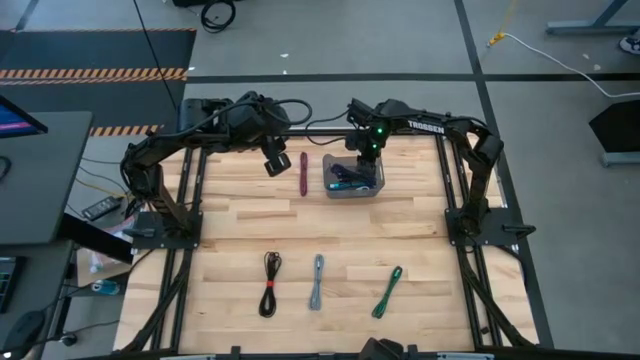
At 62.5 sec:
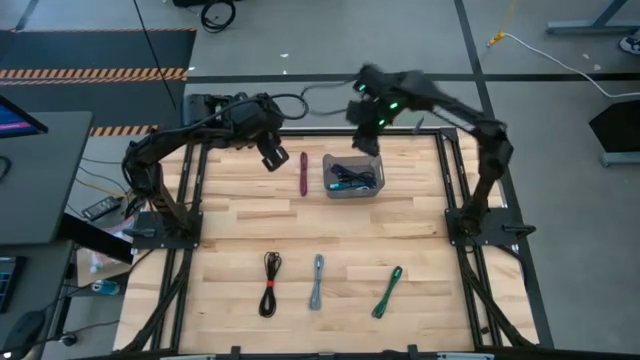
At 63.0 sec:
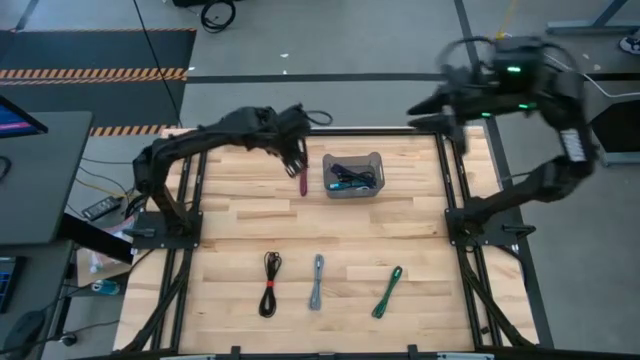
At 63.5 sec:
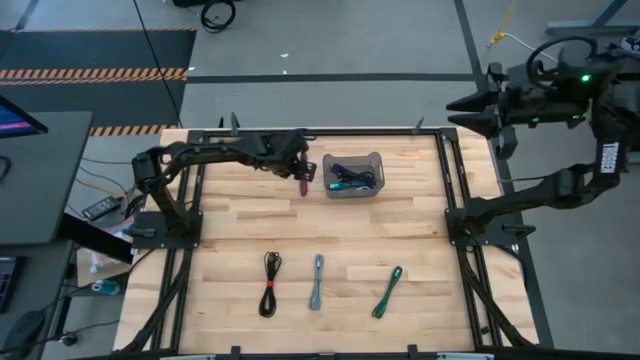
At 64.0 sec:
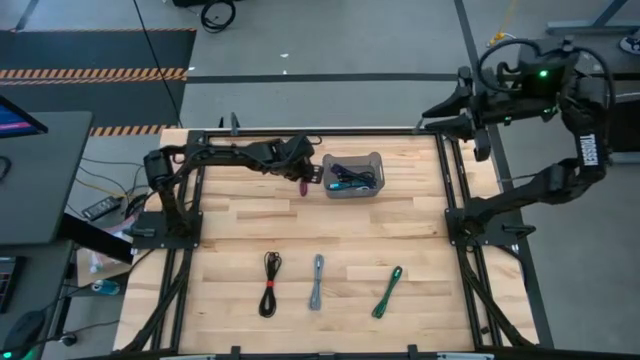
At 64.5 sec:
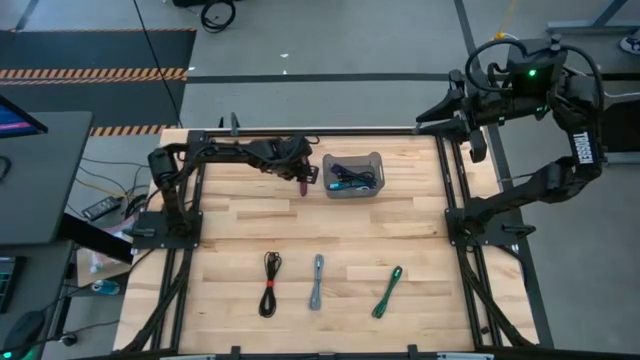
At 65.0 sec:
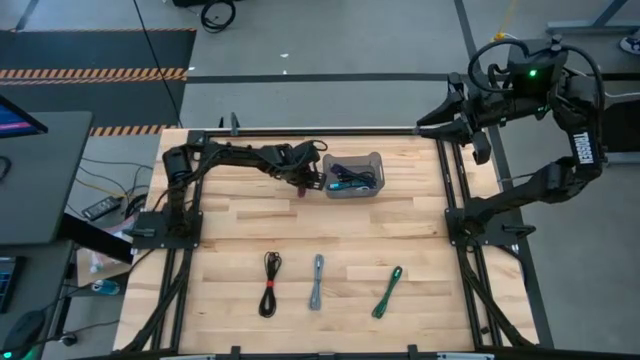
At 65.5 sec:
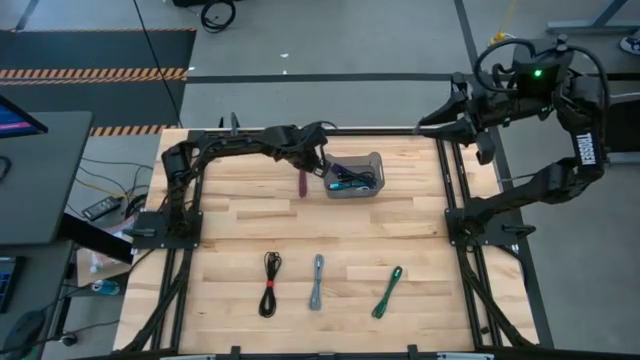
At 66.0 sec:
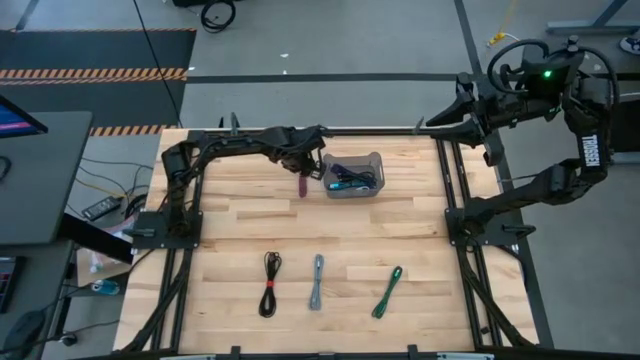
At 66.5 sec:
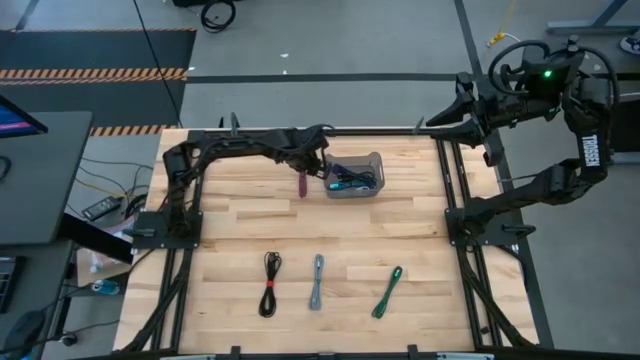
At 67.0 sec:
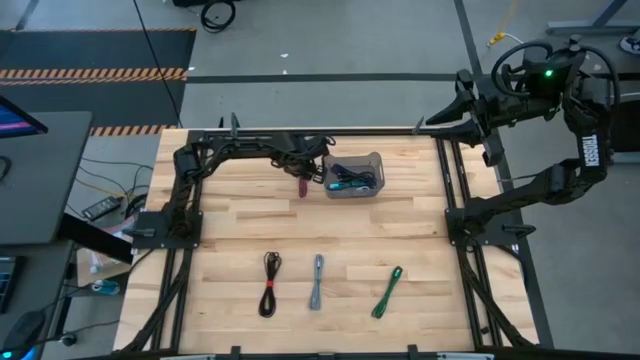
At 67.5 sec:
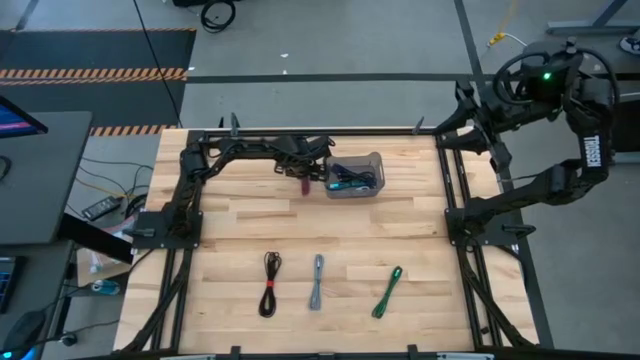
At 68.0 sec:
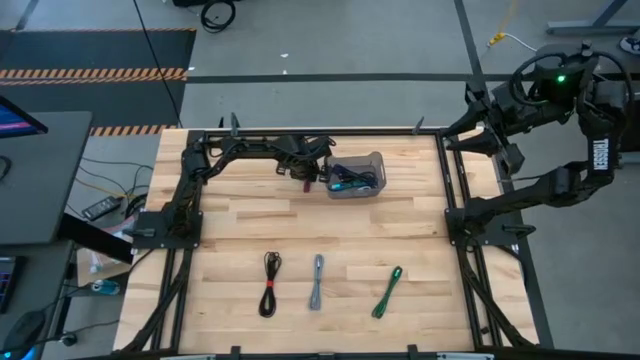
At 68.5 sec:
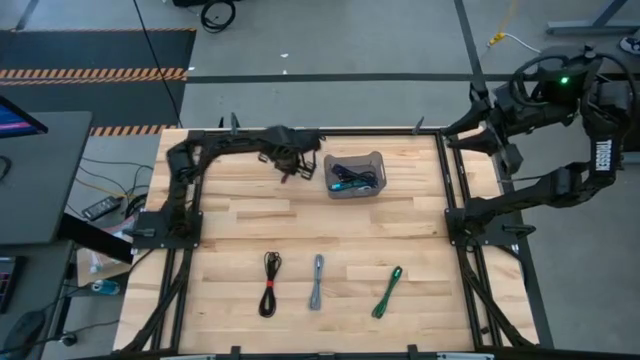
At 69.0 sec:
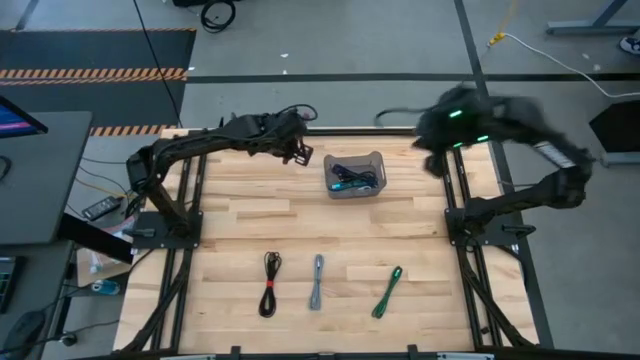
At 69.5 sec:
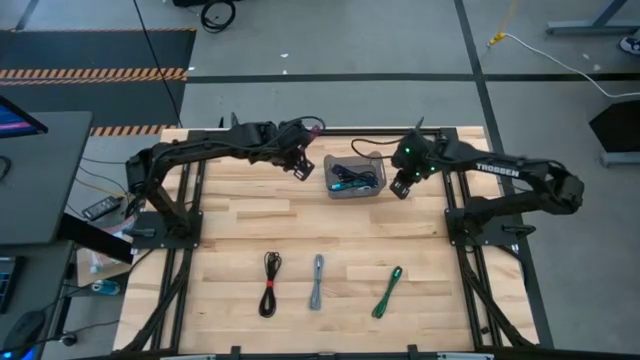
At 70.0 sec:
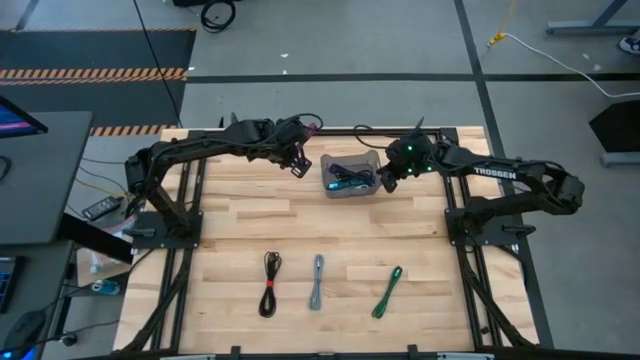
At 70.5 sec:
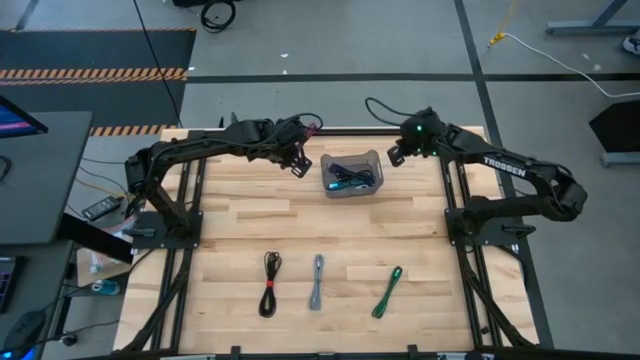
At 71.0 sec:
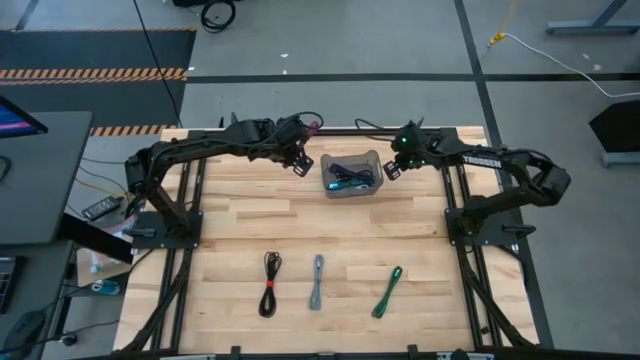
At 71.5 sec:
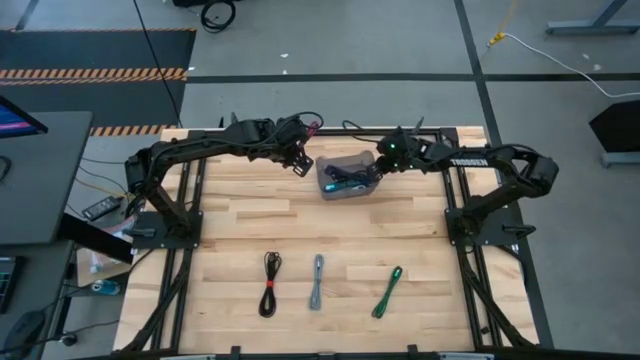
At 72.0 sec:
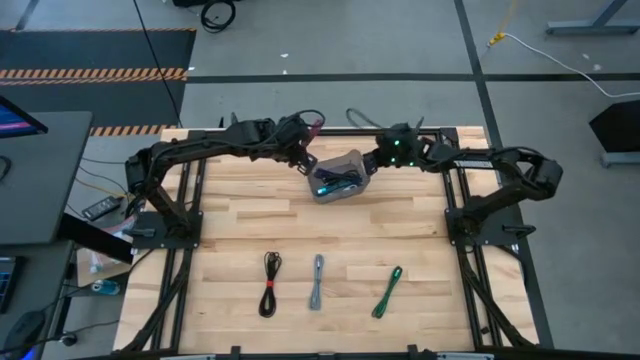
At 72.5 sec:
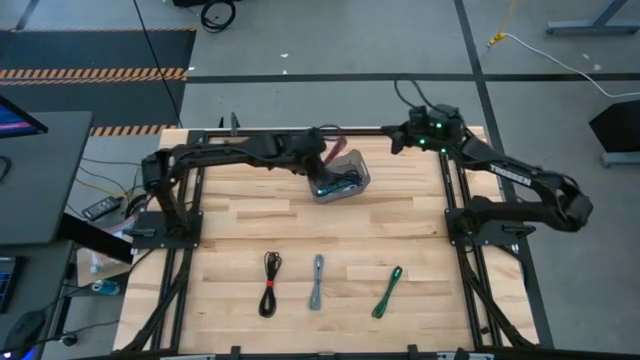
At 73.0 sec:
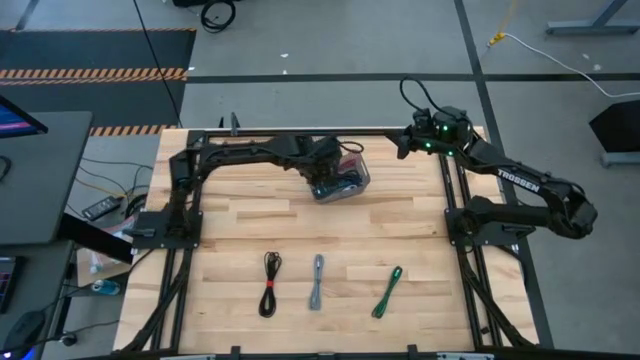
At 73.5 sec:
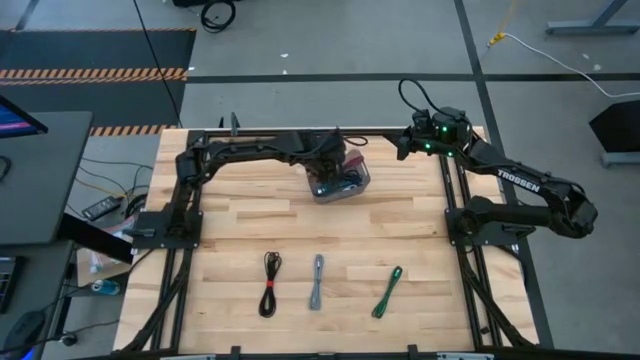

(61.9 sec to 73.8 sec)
Task: Pick and place USB-C Cables
Put the black and pink charger cable into the black bin

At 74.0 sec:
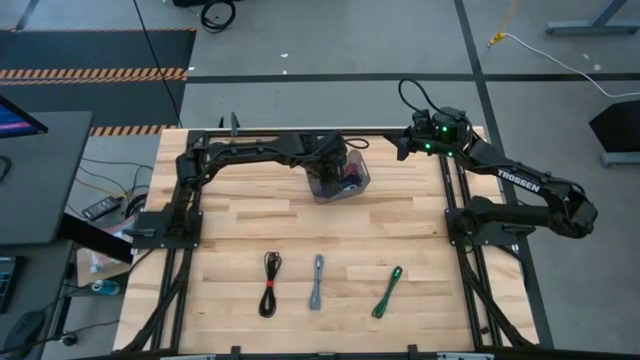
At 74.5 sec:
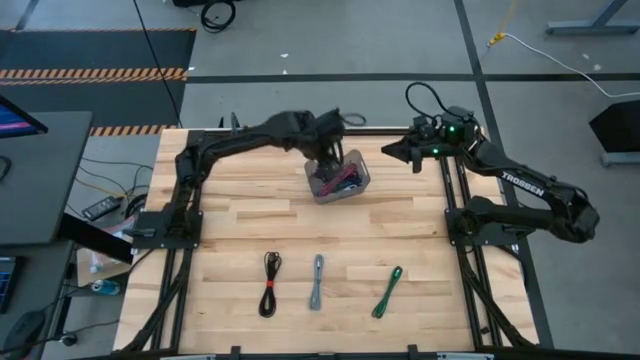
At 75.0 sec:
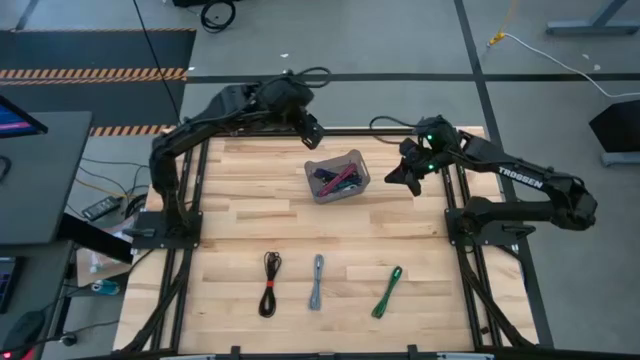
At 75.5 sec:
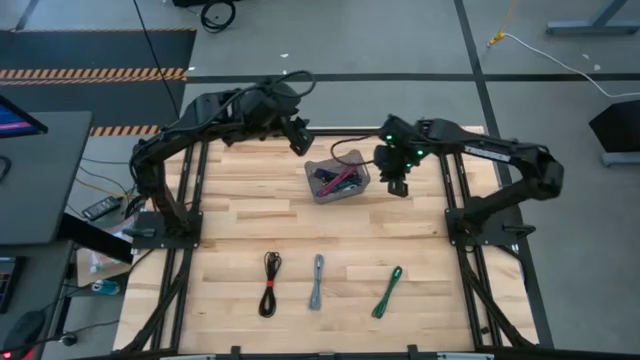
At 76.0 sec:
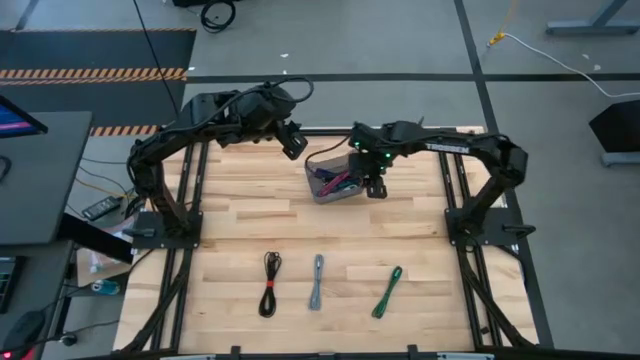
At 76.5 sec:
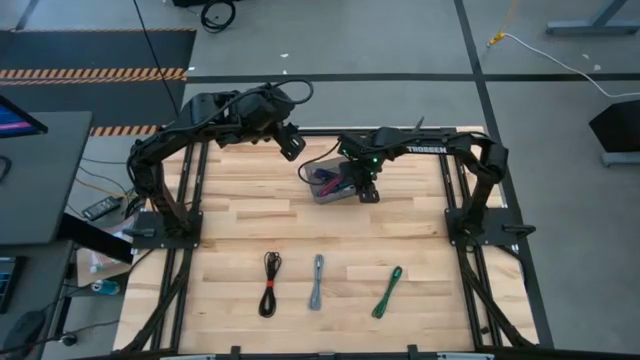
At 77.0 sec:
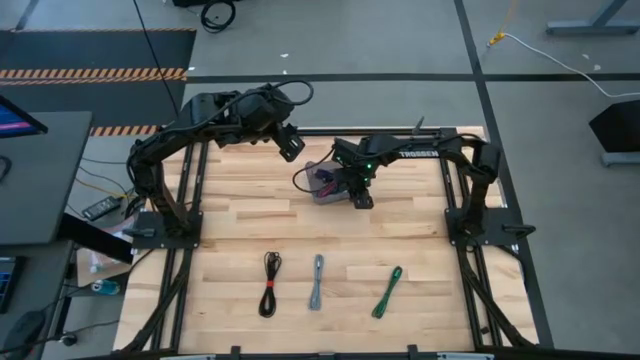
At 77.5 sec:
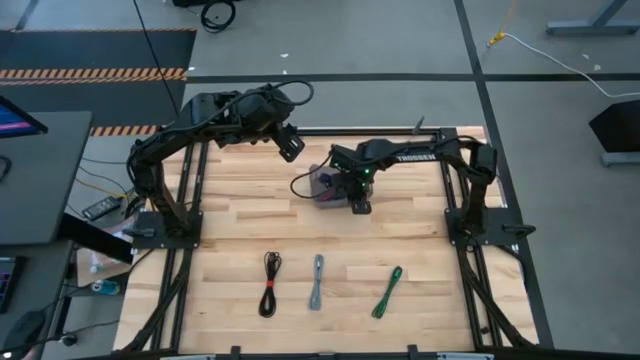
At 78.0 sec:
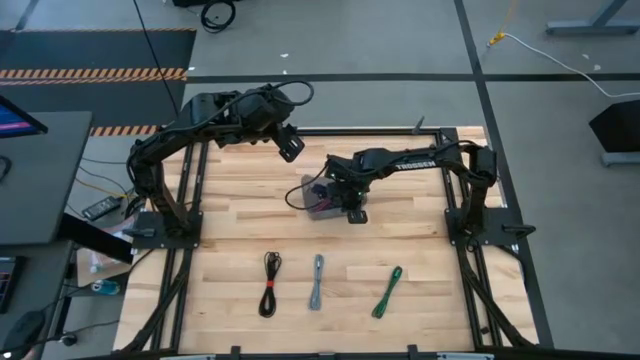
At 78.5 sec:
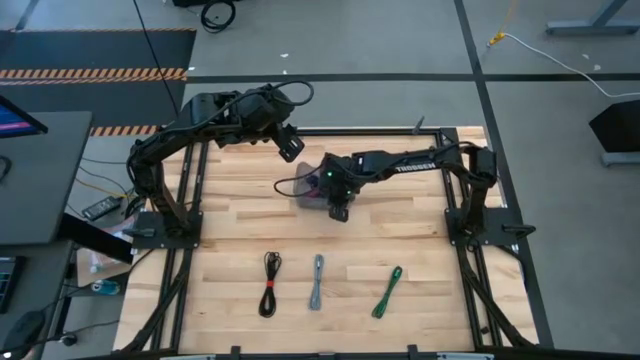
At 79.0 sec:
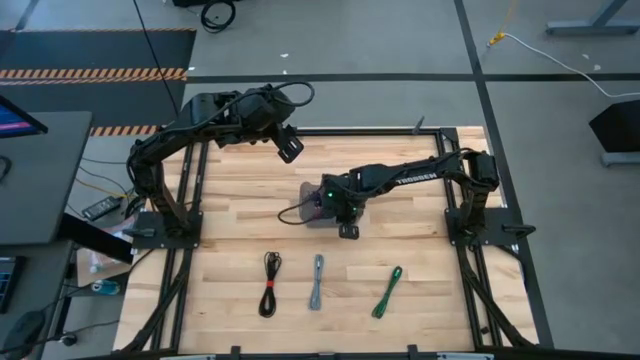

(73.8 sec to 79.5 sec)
Adjust the black bin

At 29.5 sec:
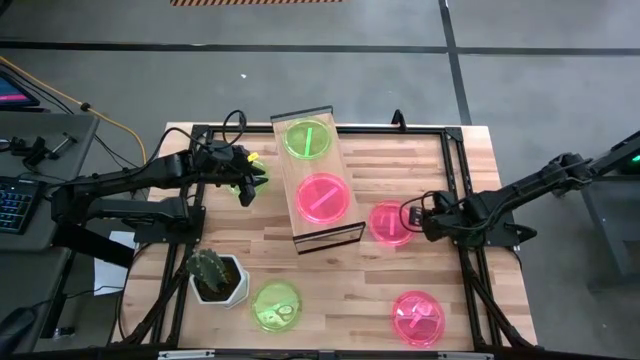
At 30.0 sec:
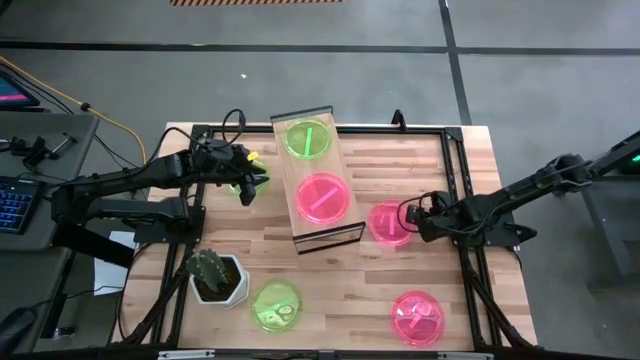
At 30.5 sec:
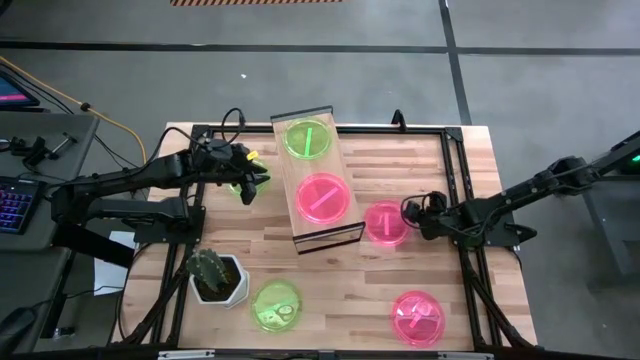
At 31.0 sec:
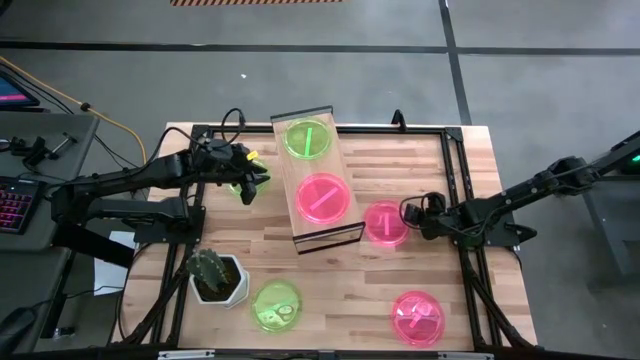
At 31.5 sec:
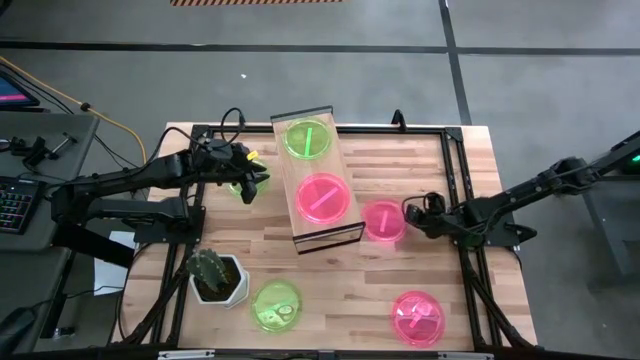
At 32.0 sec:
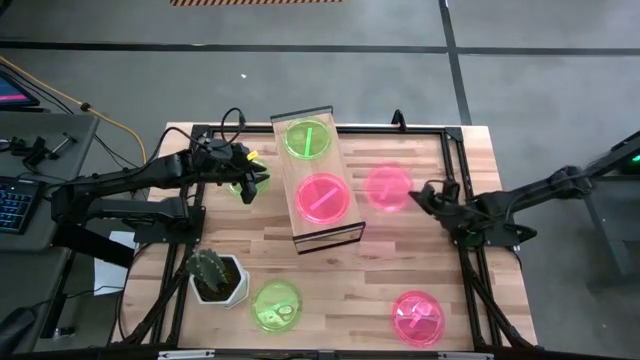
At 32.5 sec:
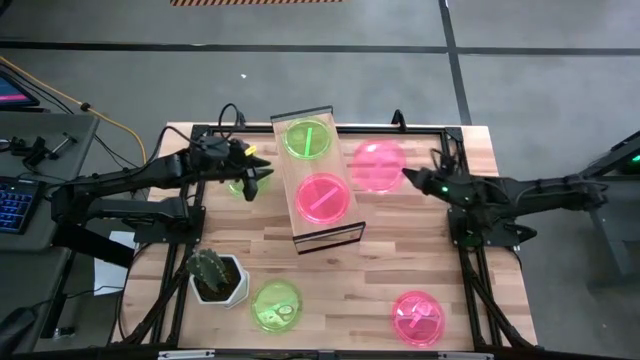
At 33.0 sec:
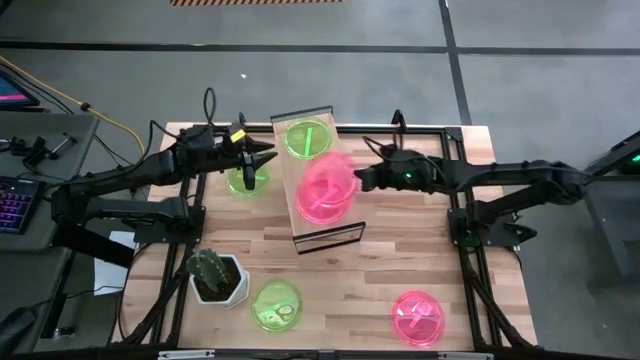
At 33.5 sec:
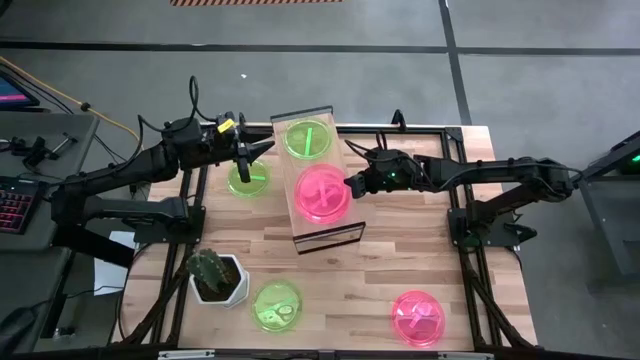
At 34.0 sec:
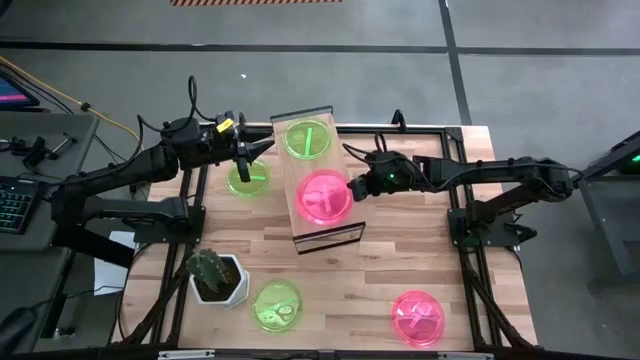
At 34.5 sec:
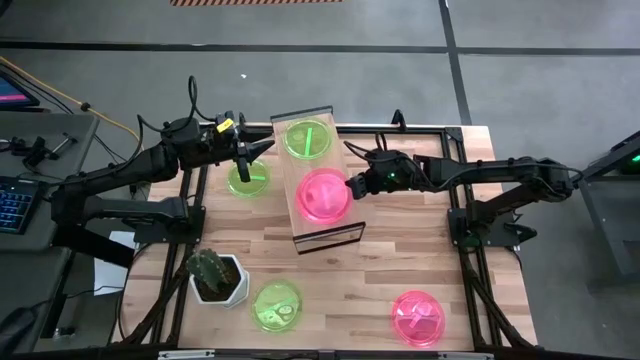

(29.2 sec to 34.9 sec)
Task: Place and stack plates onto a shelf
Stack the top light red plate on top of the light red plate on the shelf
